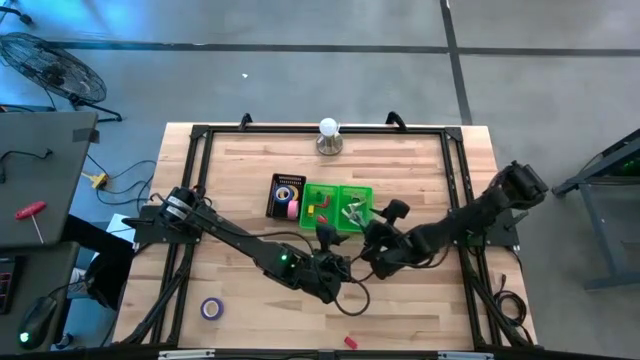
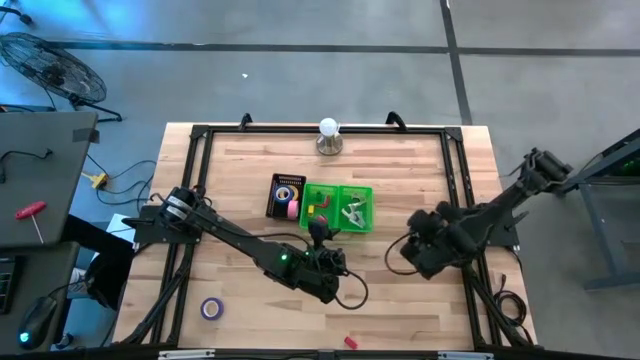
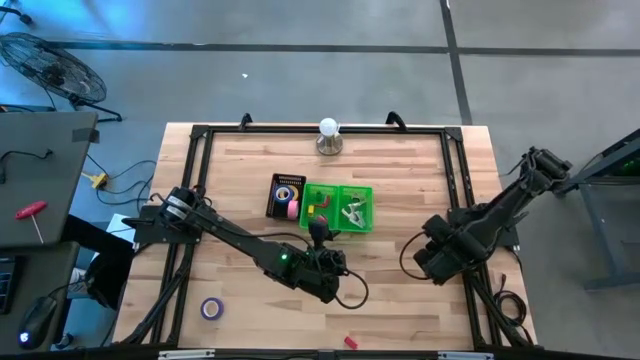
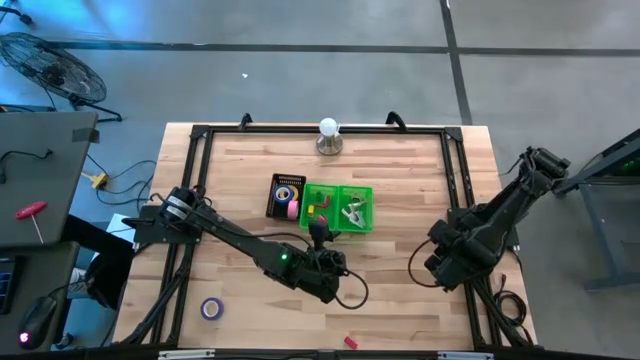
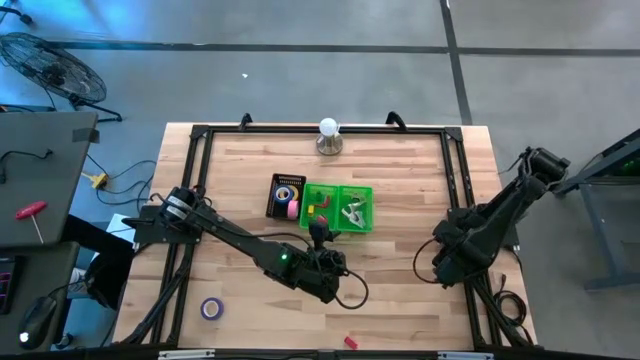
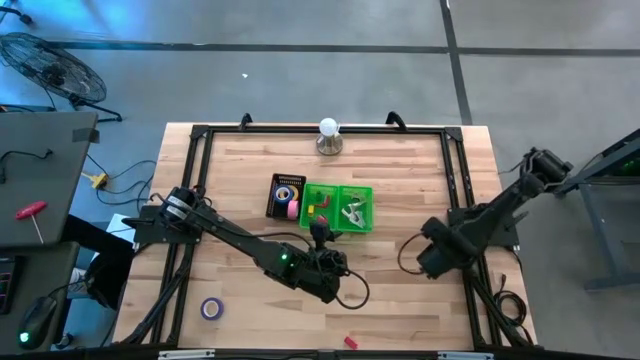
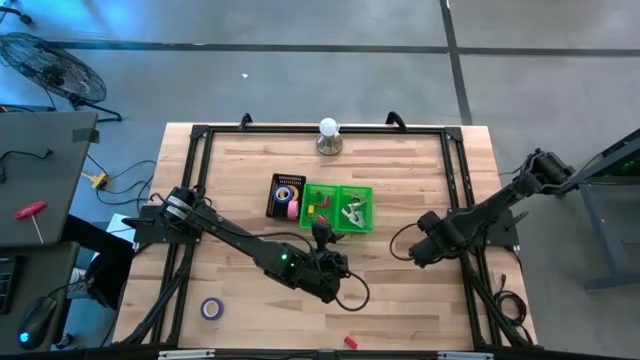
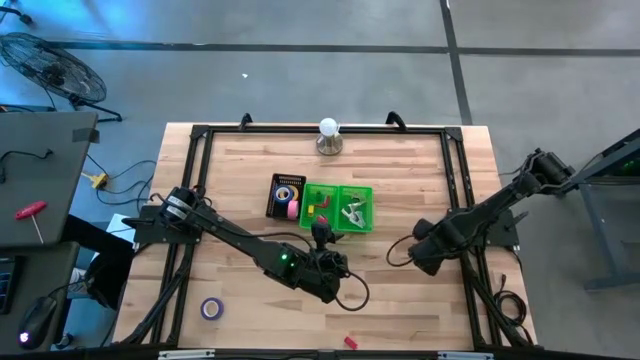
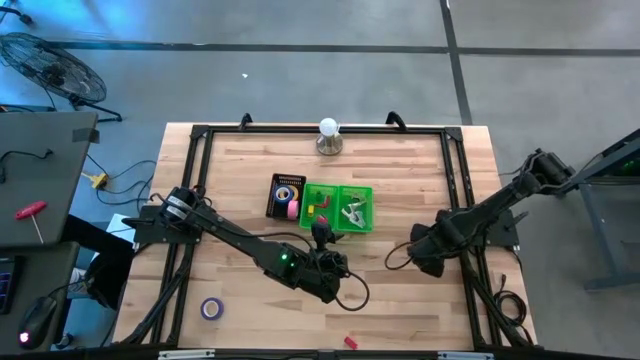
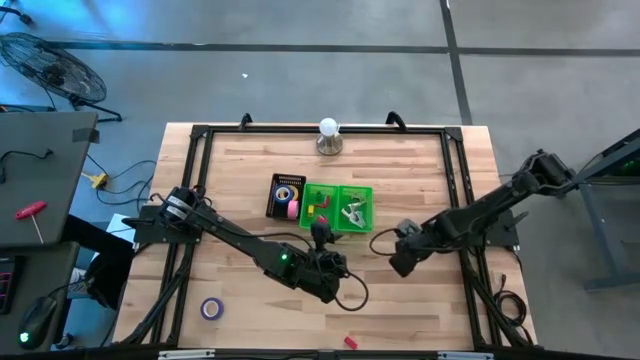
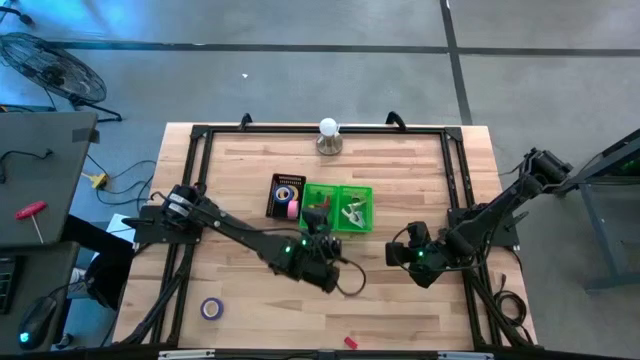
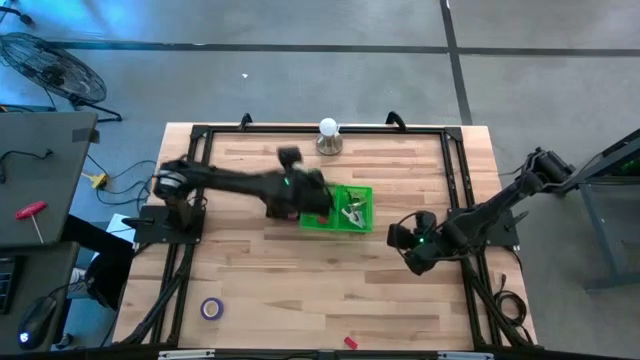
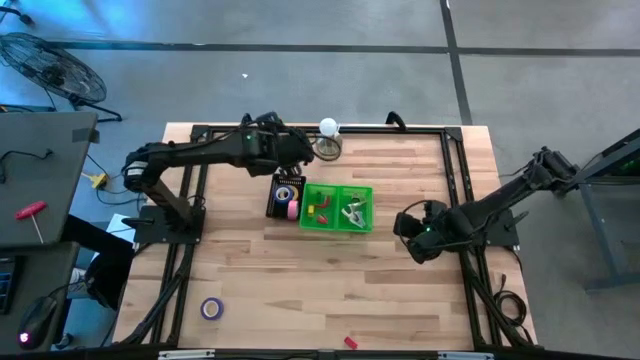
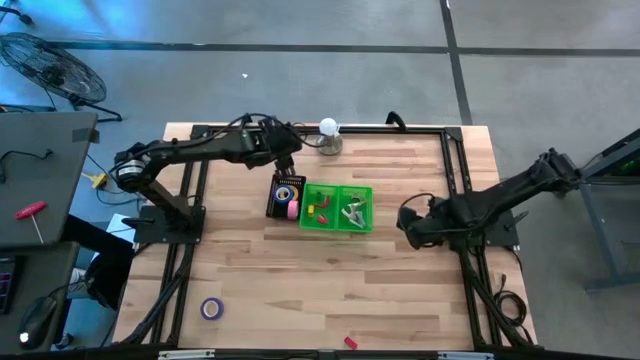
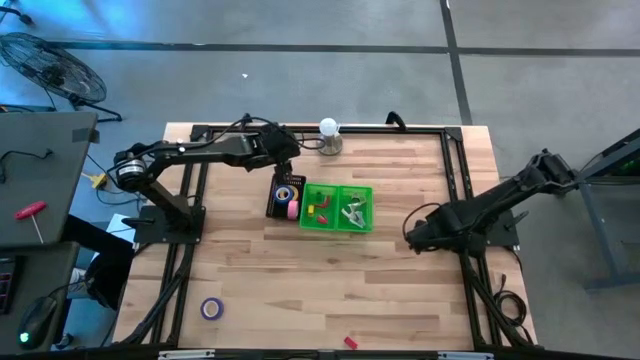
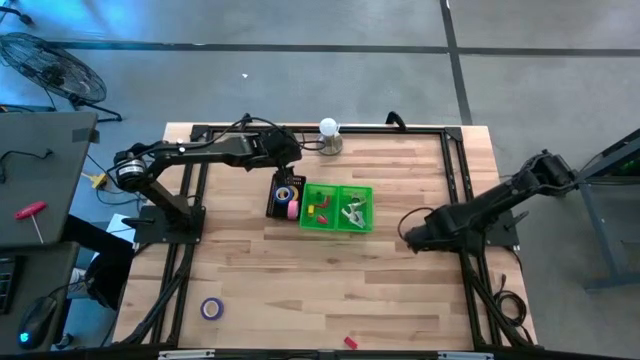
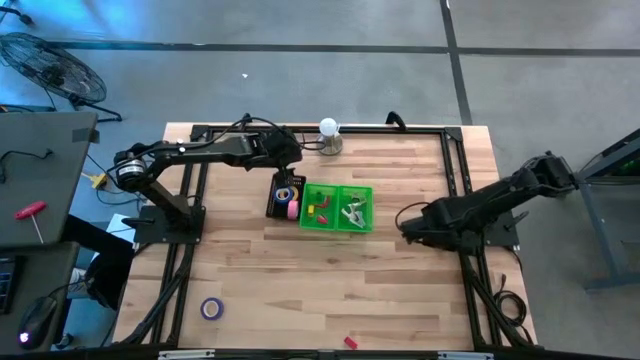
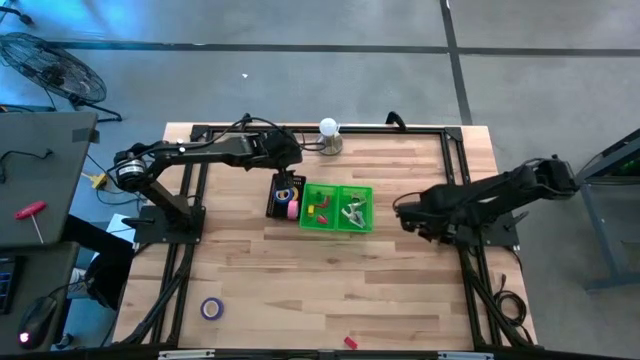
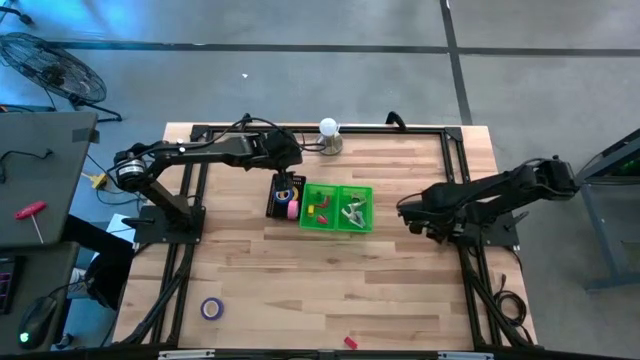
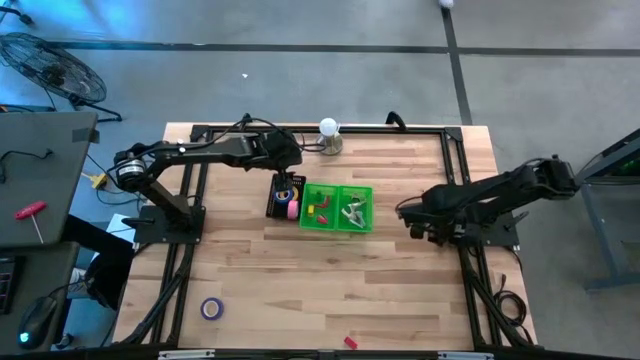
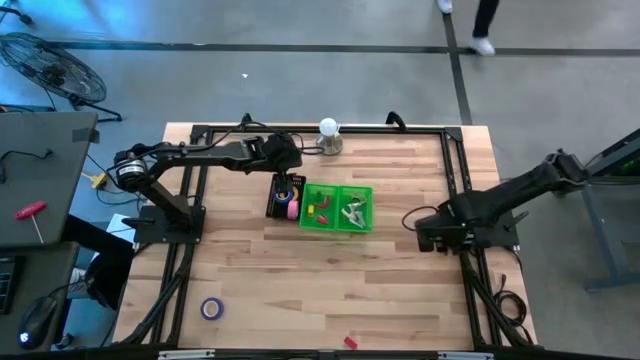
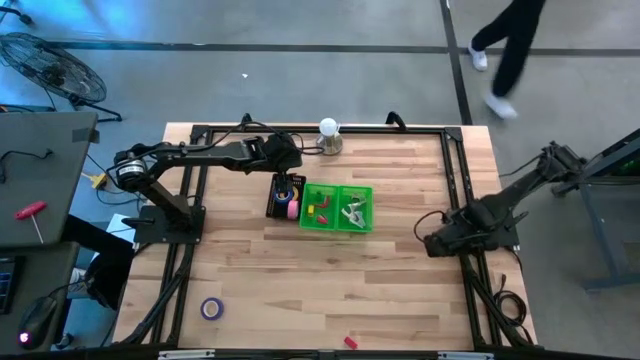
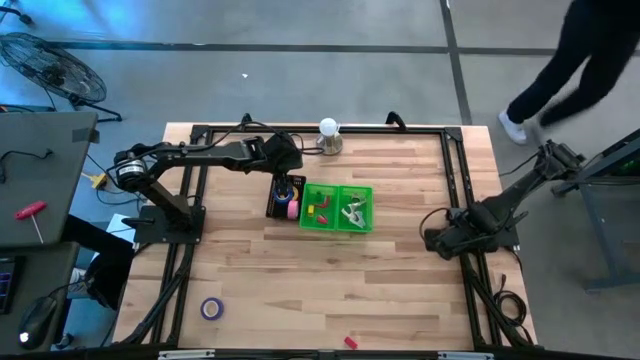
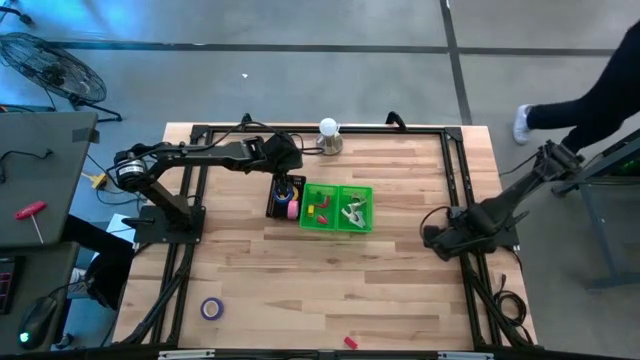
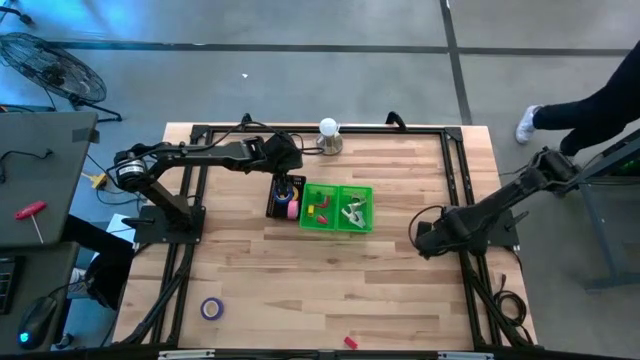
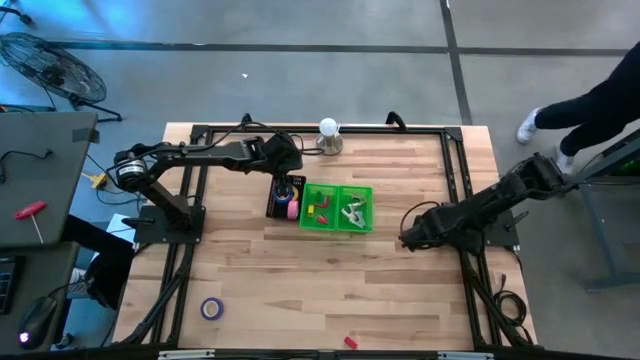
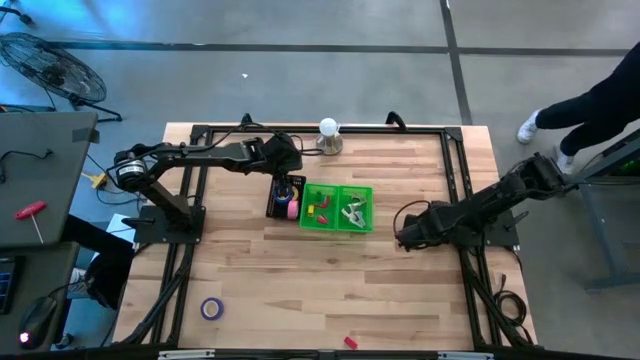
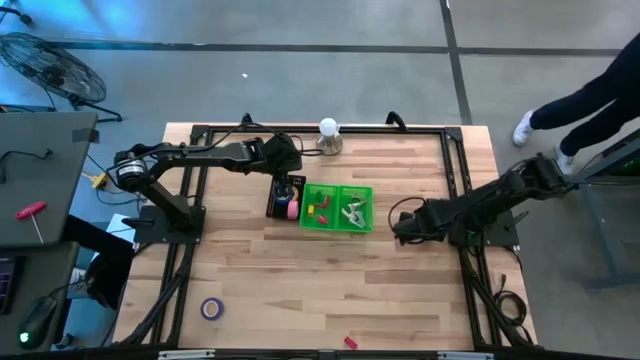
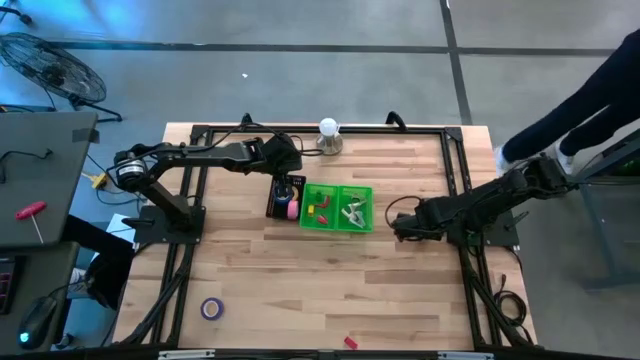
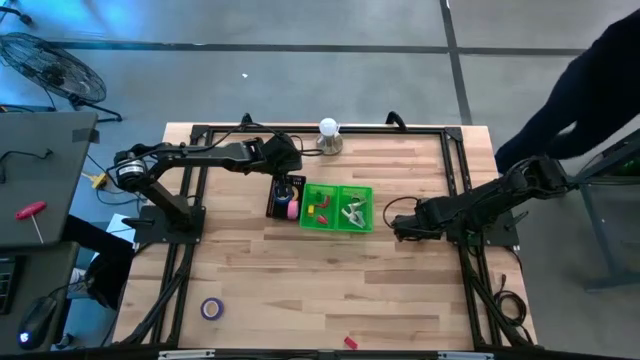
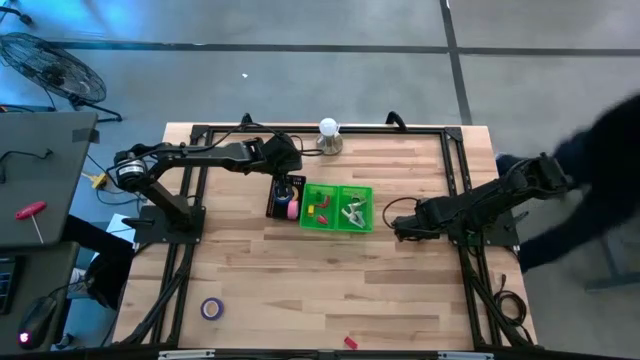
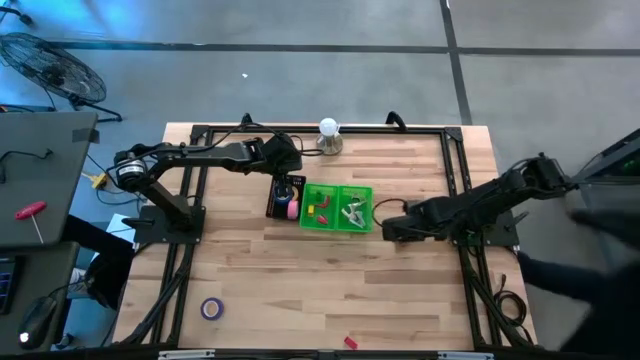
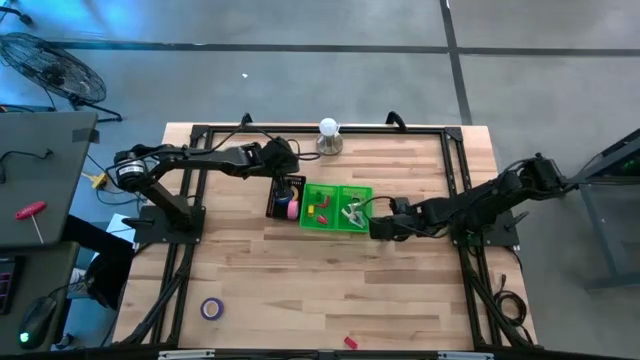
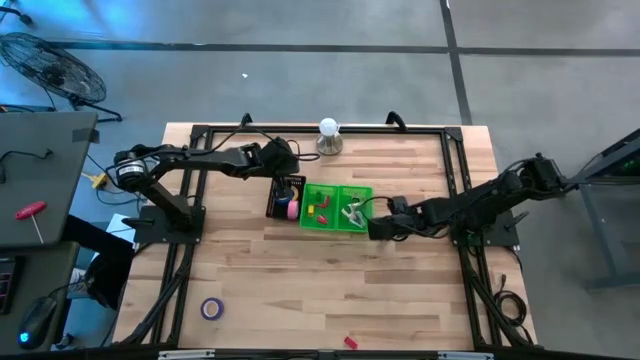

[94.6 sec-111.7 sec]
Task: Pick and place Stapler, Stapler remover, tape
Put the black staple remover into the right green bin

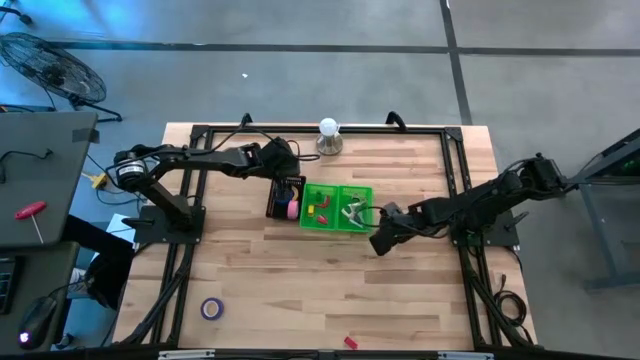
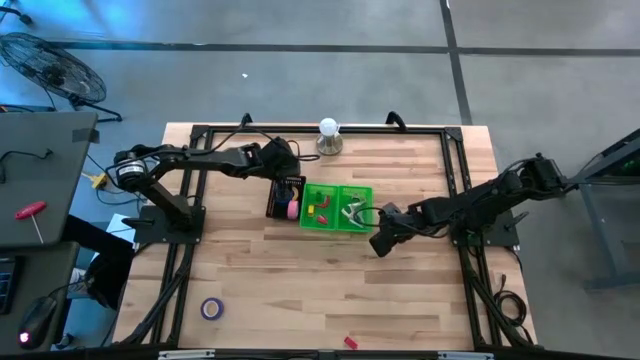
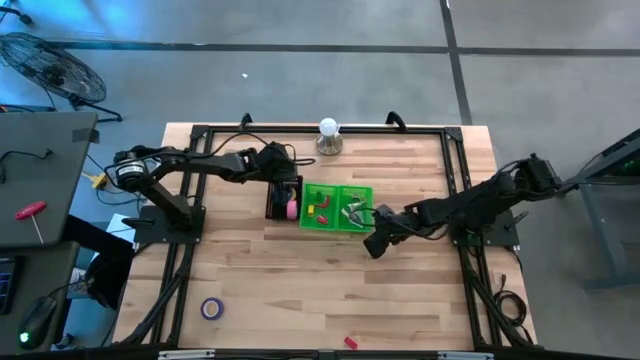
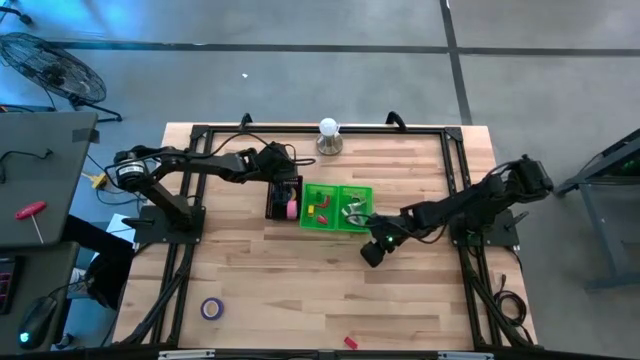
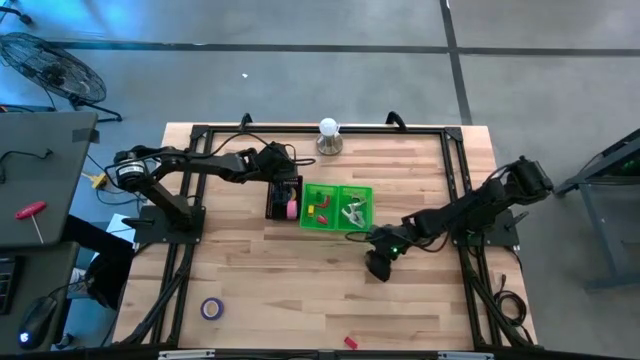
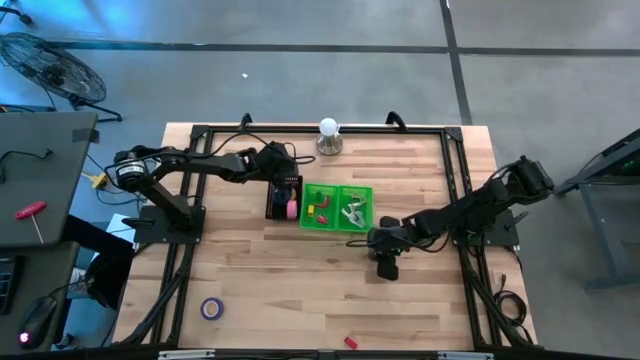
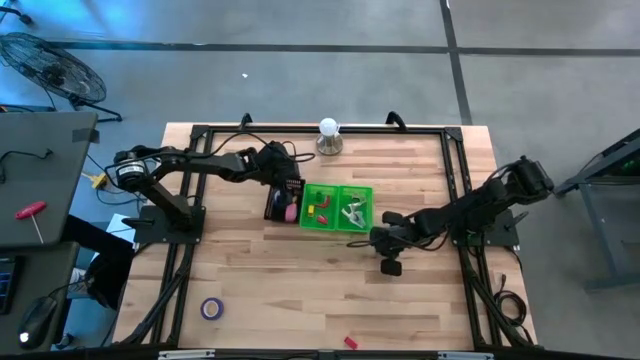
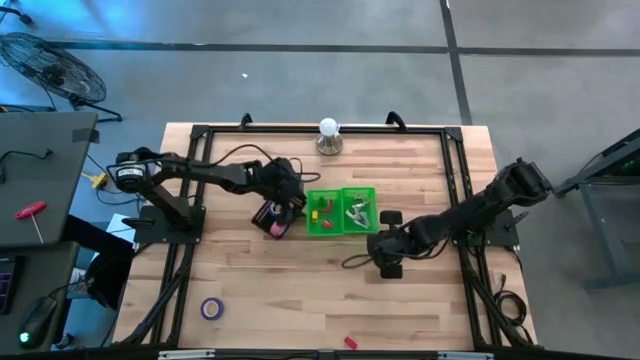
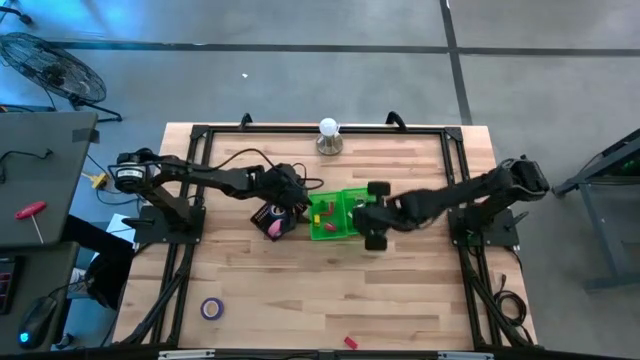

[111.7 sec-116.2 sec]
Put the black staple remover into the right green bin

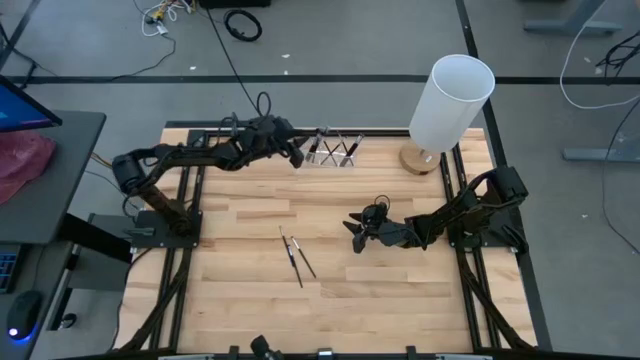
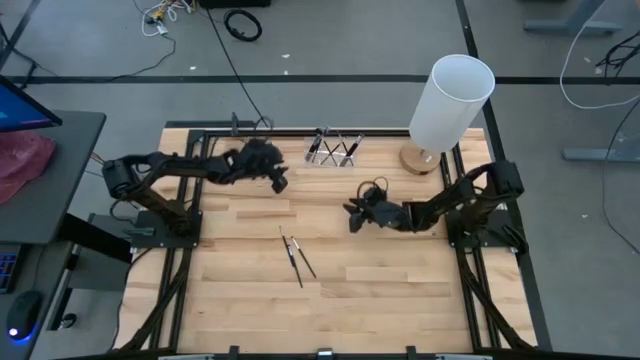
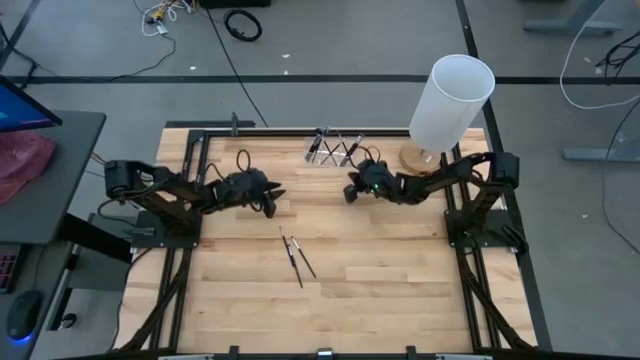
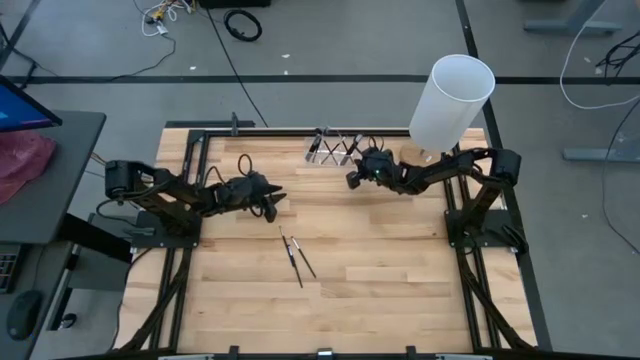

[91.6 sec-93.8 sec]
Task: Pick & Place Makeup Supplies
Adjust the transparent organizer
